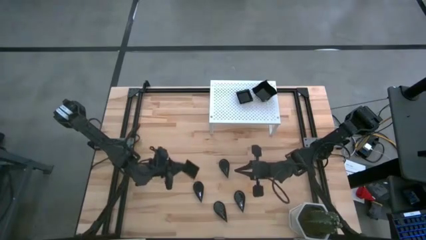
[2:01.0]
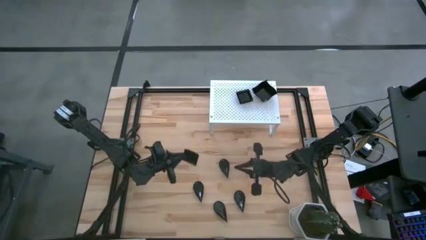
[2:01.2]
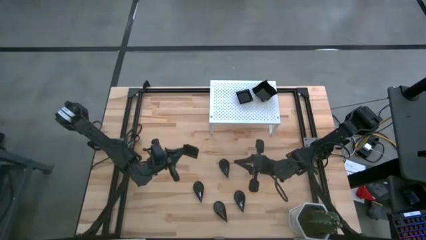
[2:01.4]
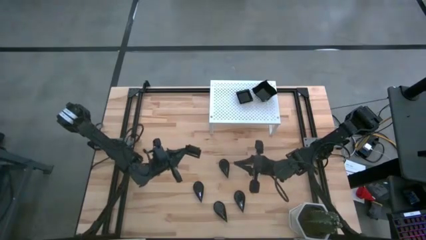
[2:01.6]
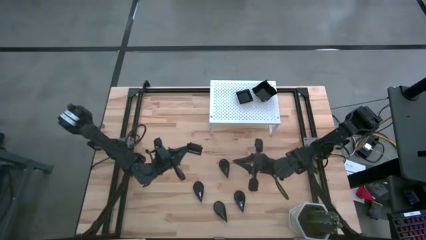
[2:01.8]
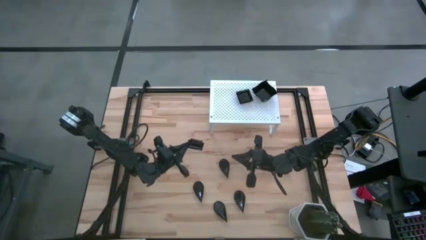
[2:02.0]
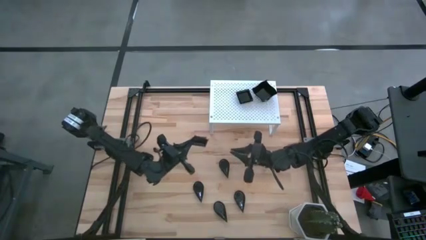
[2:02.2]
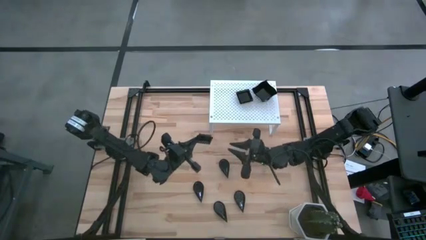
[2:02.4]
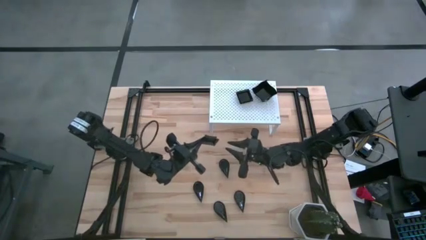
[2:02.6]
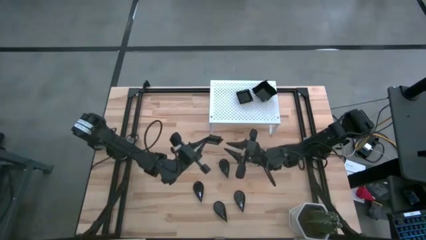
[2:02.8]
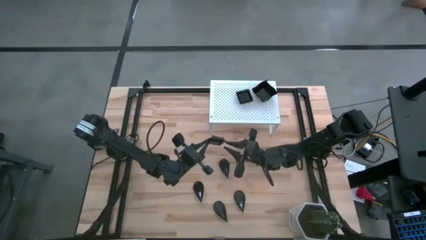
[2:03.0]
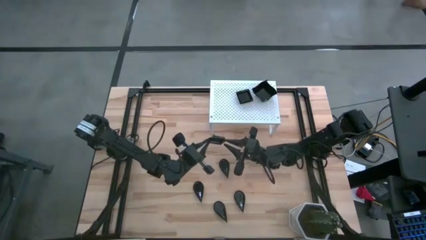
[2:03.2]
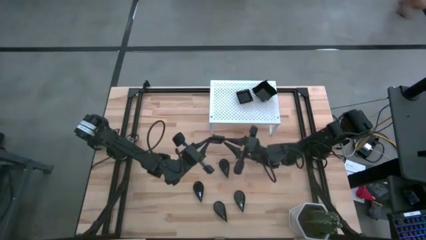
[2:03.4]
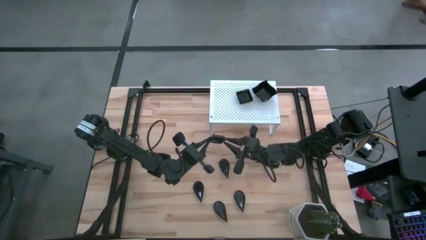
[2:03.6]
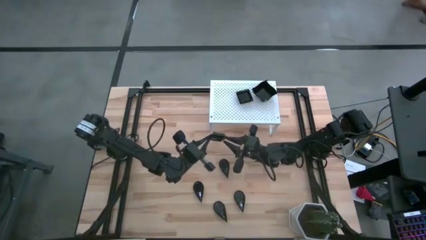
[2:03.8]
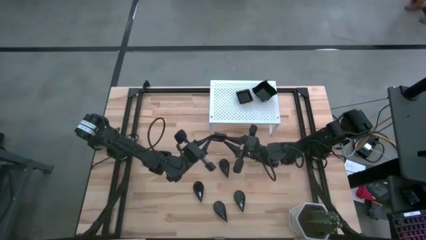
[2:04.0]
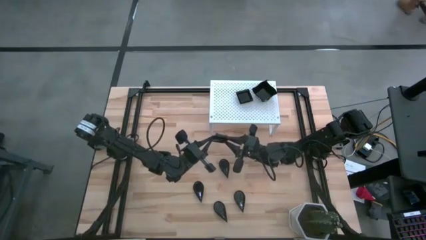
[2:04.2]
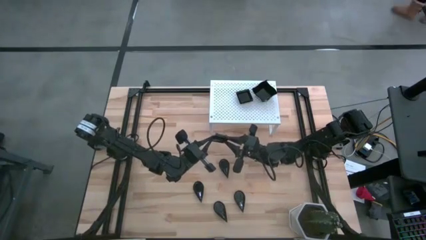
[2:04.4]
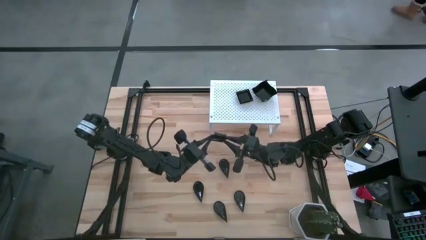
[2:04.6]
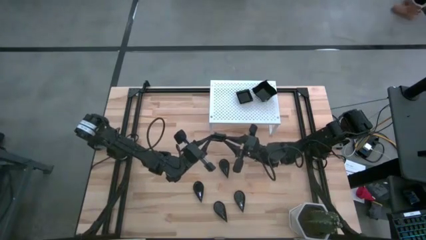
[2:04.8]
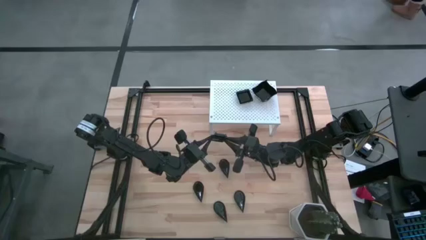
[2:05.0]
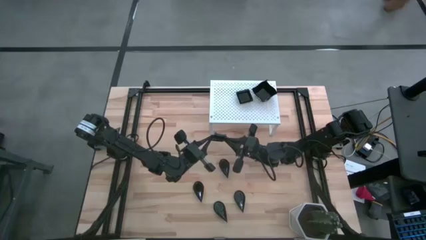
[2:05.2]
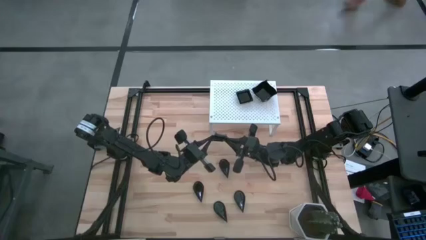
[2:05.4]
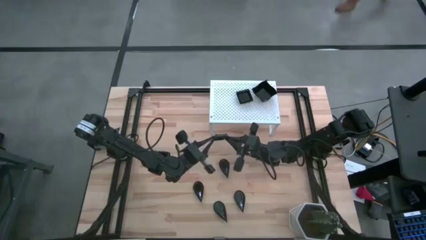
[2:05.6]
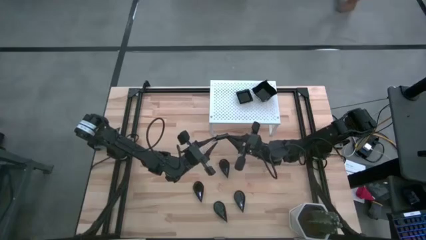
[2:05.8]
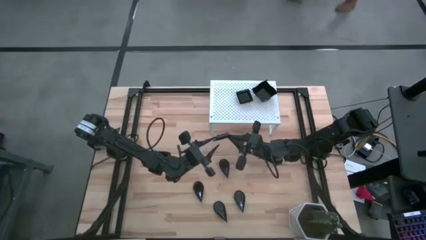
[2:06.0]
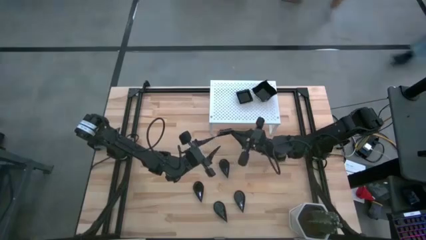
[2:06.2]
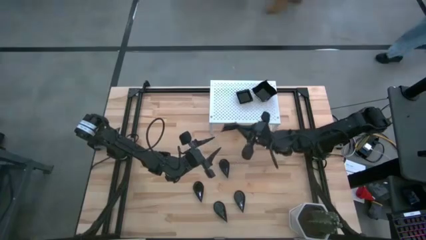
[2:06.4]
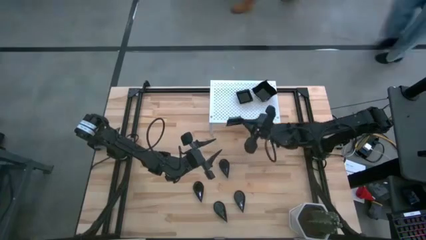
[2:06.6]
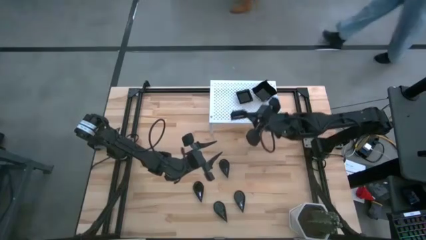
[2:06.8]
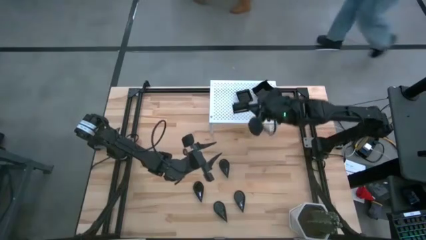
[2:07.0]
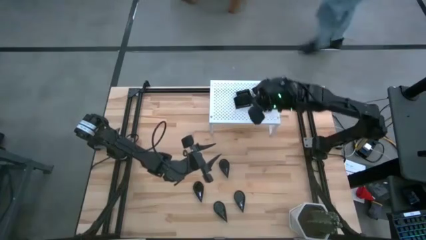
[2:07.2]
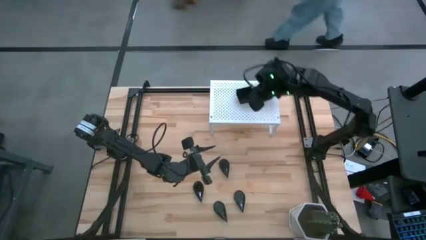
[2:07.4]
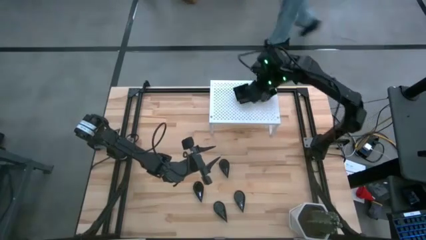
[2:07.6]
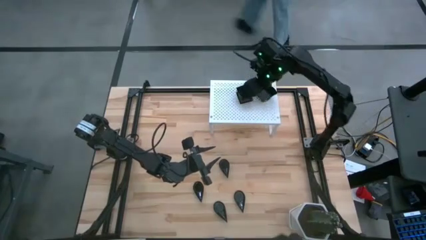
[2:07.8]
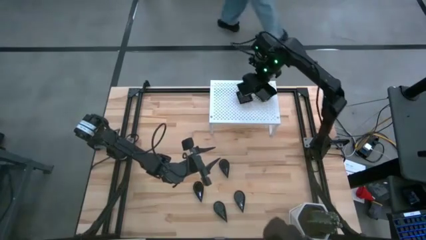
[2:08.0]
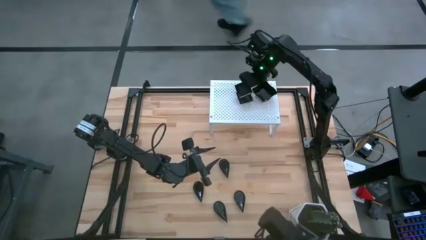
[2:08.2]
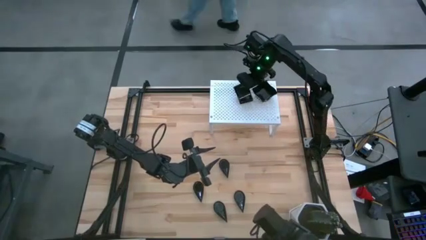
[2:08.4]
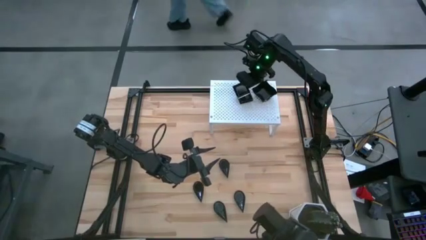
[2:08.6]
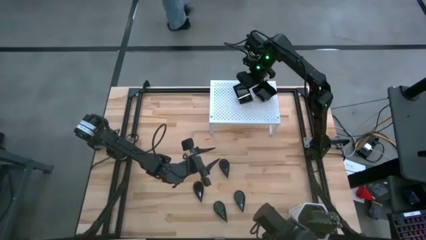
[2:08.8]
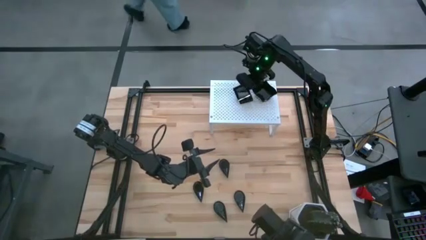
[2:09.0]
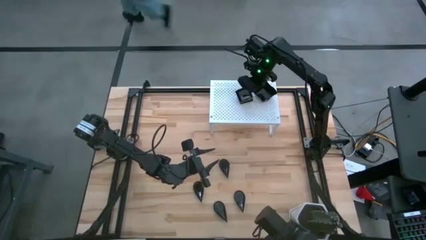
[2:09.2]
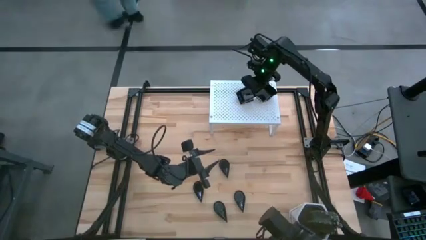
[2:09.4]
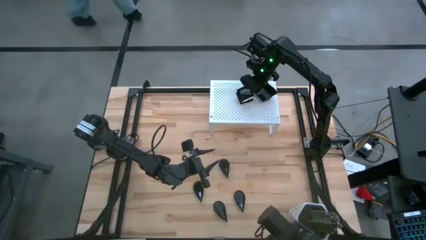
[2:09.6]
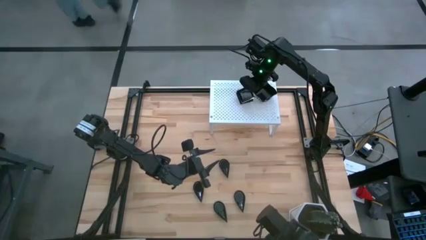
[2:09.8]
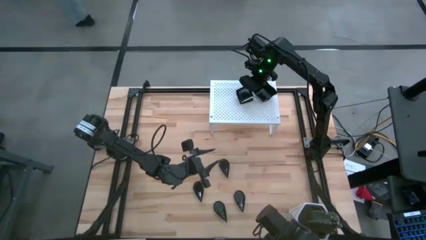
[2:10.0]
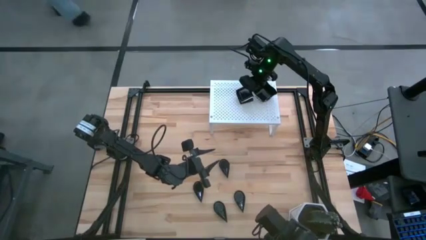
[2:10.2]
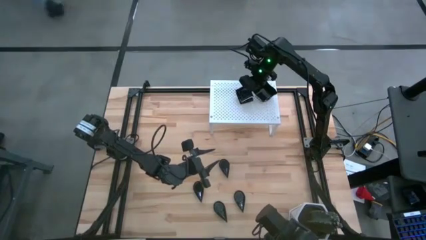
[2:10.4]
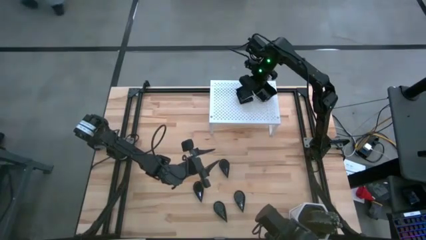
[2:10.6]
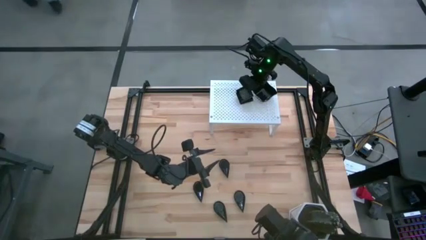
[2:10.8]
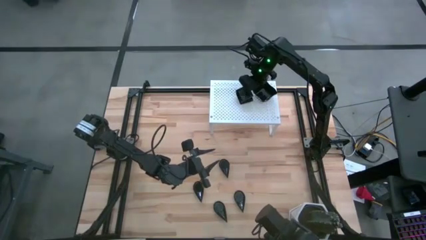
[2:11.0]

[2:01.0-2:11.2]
Task: Pick & Place Mini shaped plates
Stack the square plate on top of the square plate on the shelf
